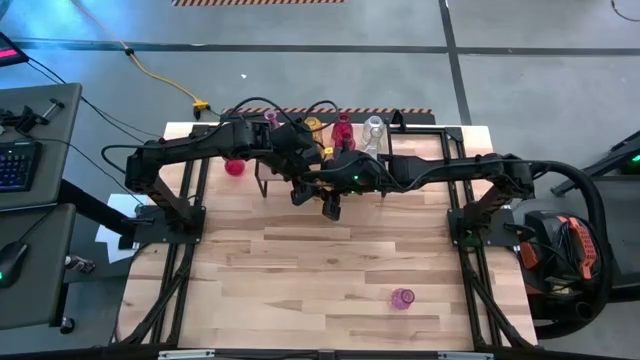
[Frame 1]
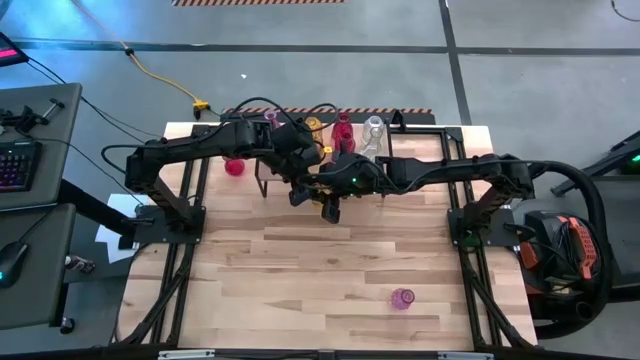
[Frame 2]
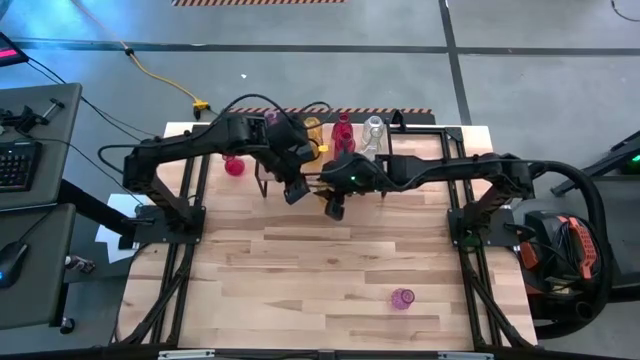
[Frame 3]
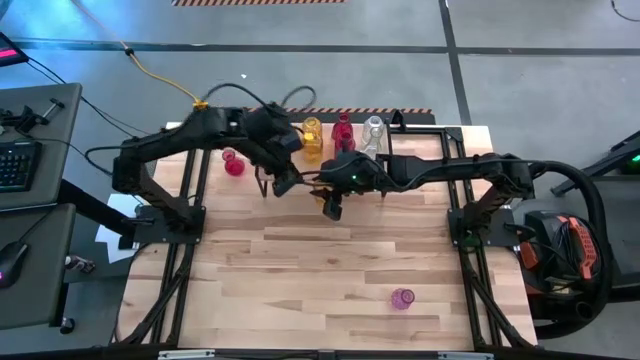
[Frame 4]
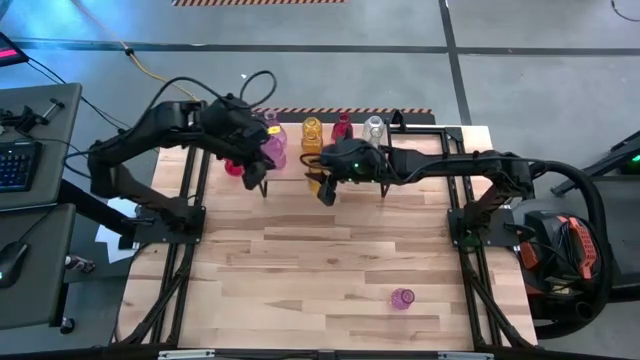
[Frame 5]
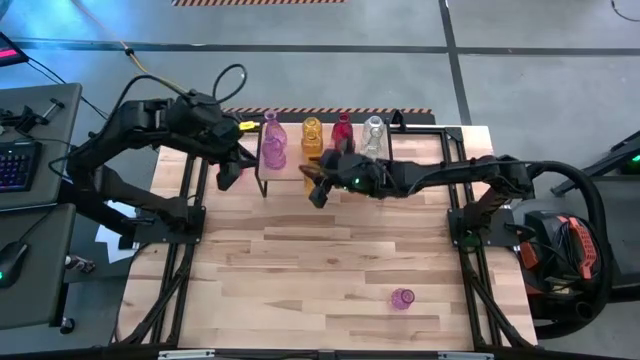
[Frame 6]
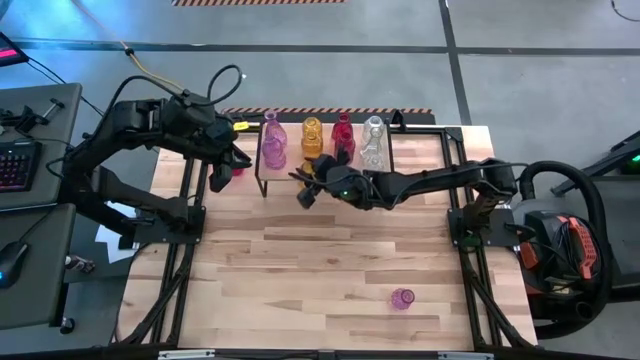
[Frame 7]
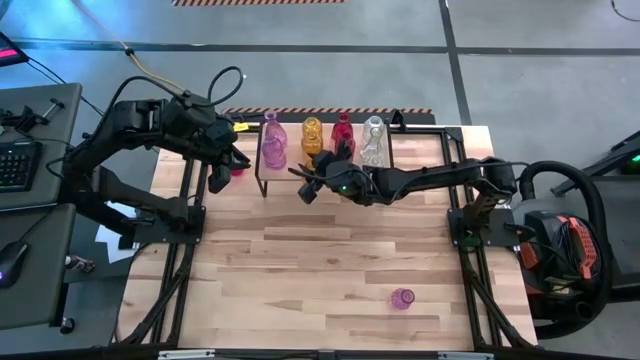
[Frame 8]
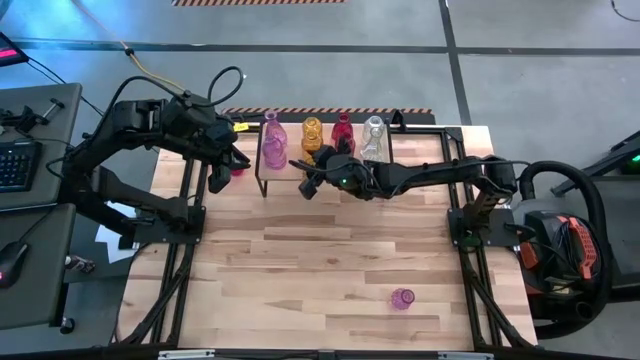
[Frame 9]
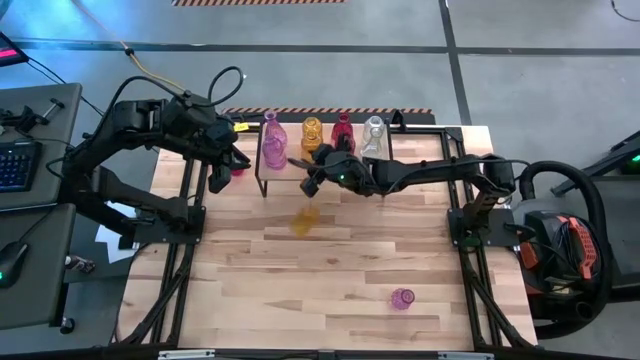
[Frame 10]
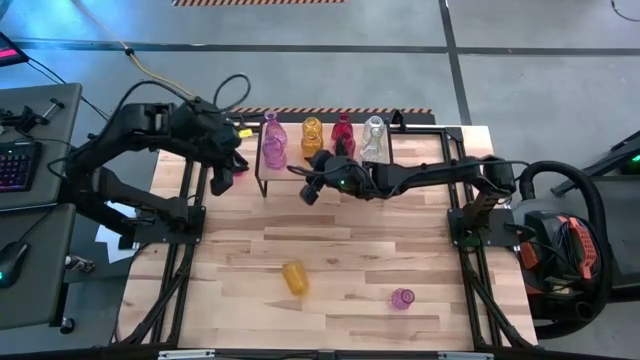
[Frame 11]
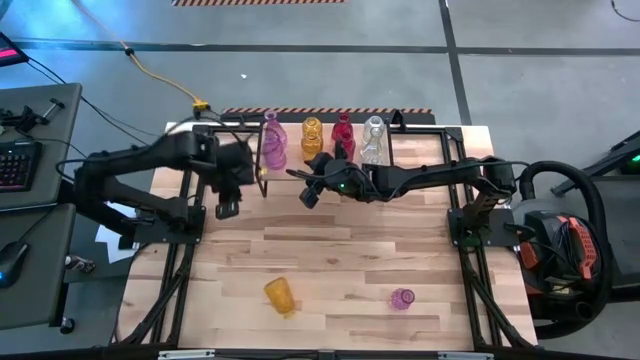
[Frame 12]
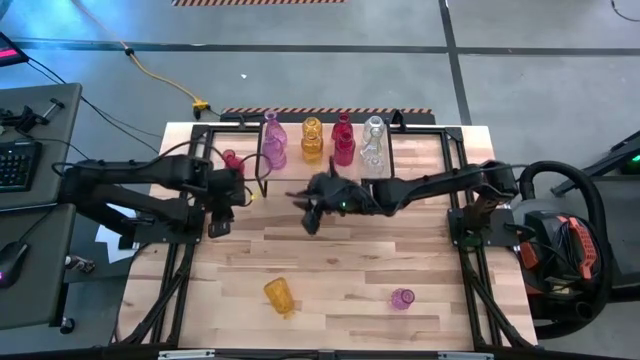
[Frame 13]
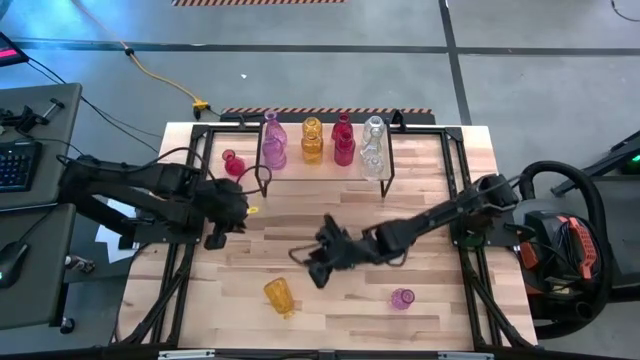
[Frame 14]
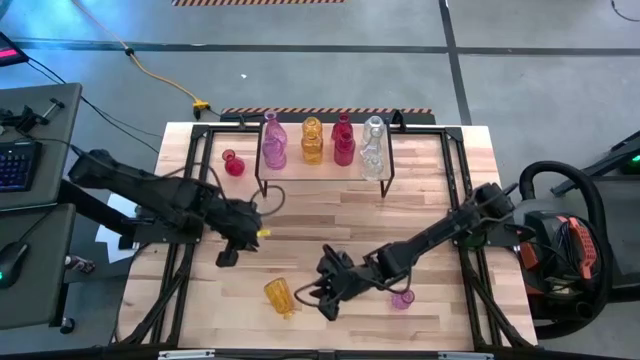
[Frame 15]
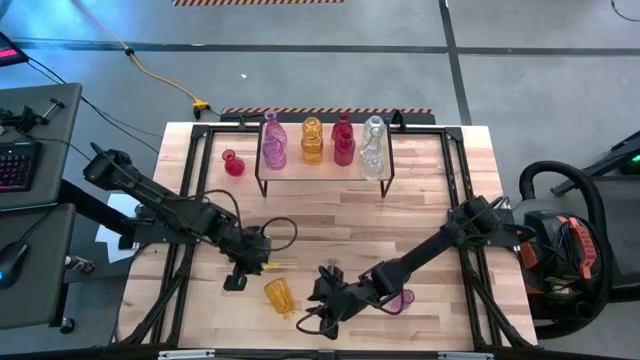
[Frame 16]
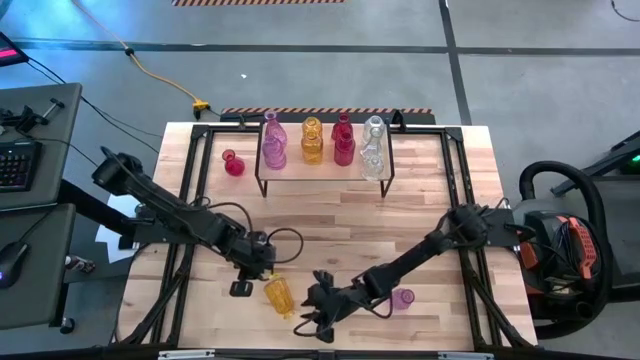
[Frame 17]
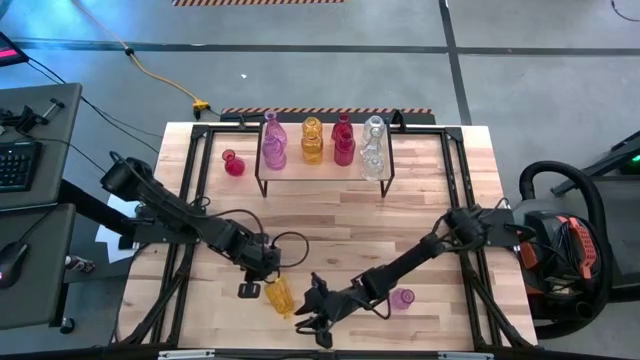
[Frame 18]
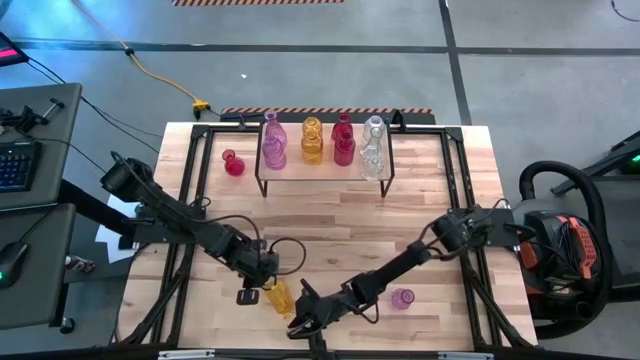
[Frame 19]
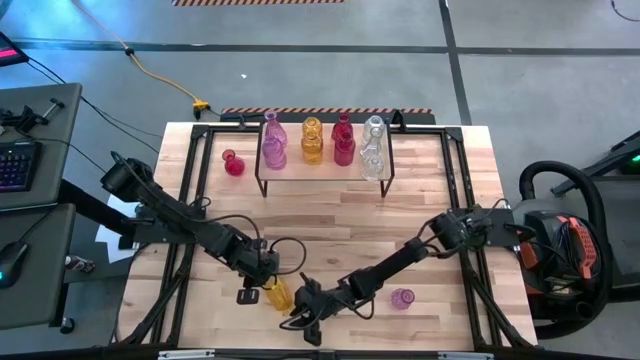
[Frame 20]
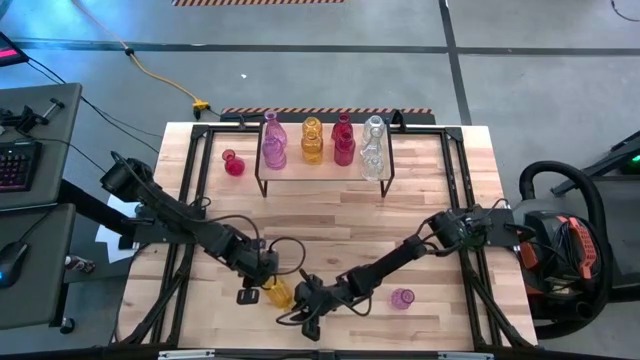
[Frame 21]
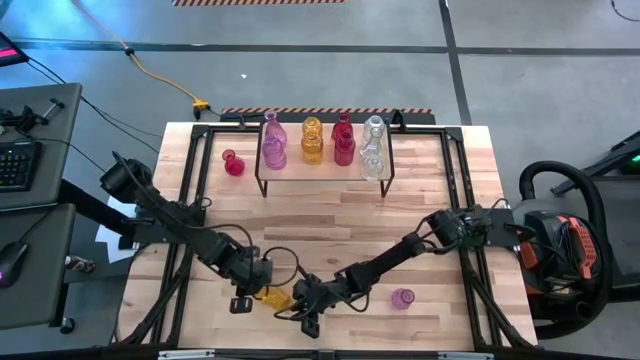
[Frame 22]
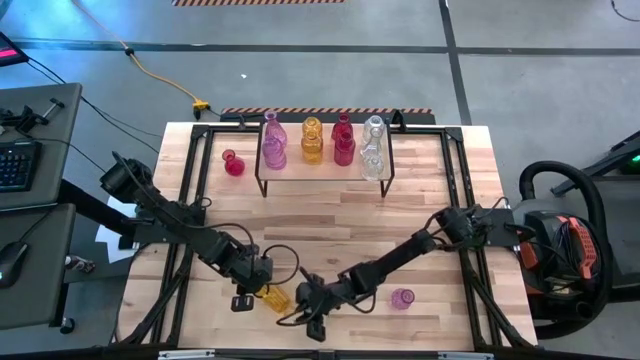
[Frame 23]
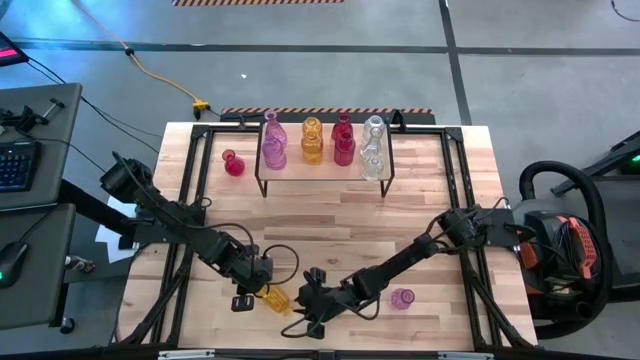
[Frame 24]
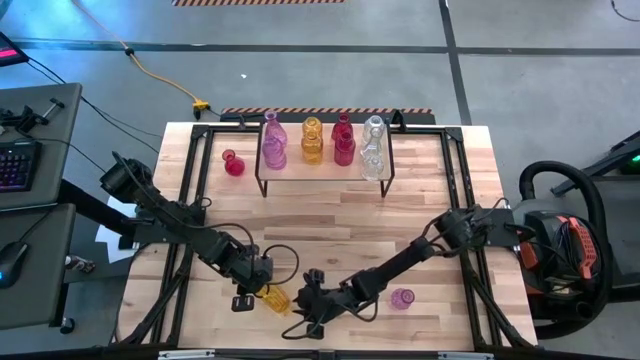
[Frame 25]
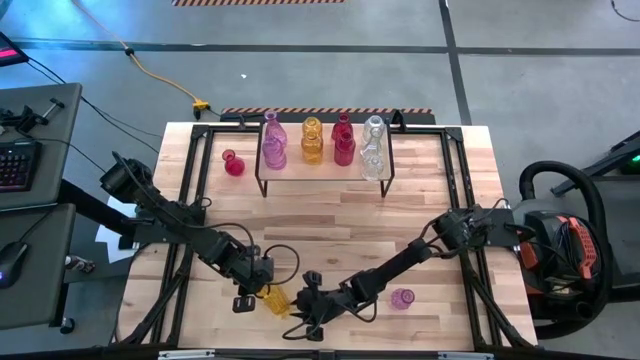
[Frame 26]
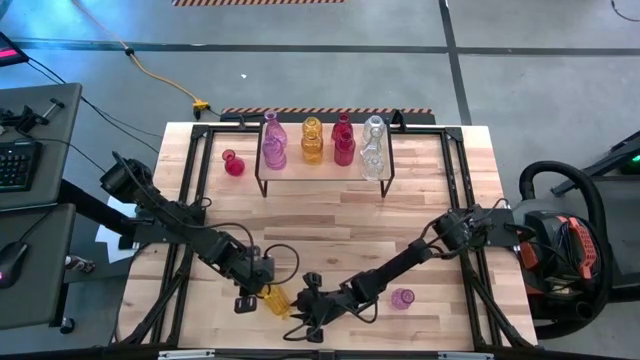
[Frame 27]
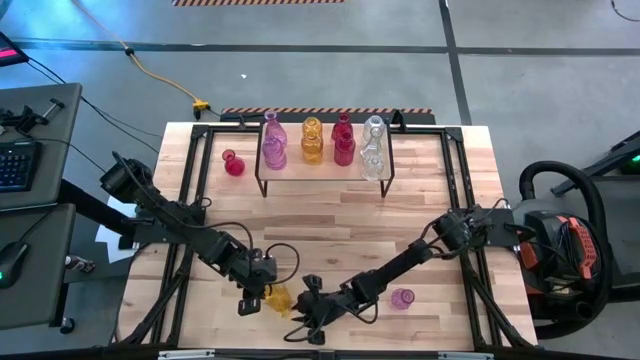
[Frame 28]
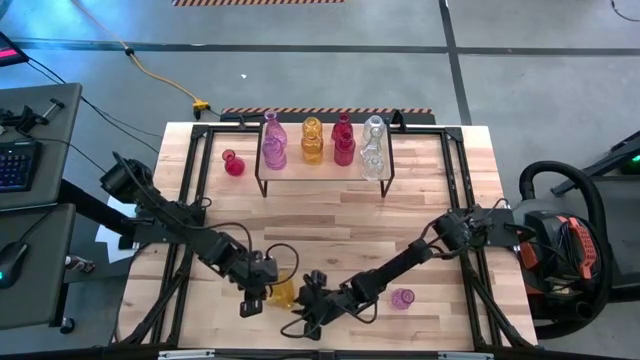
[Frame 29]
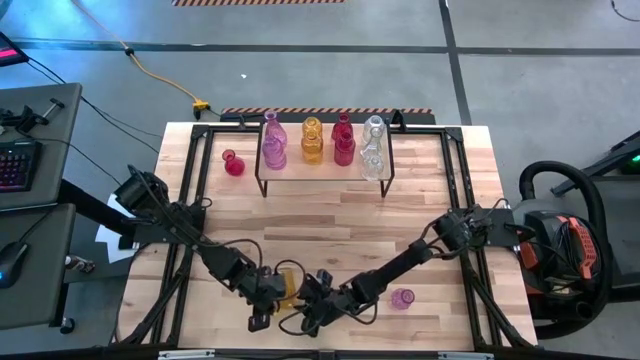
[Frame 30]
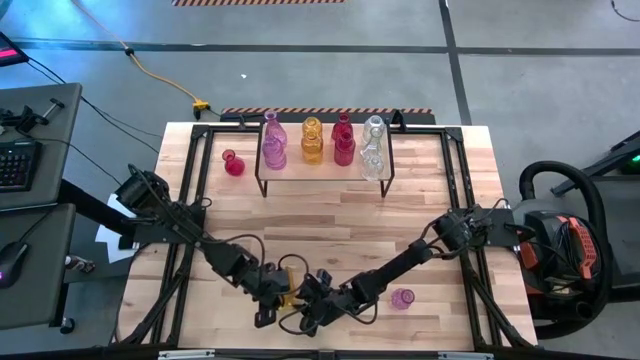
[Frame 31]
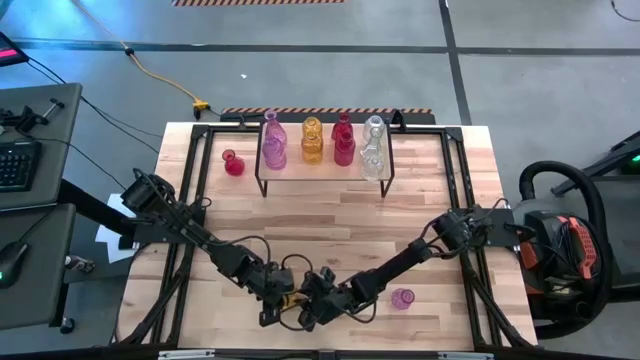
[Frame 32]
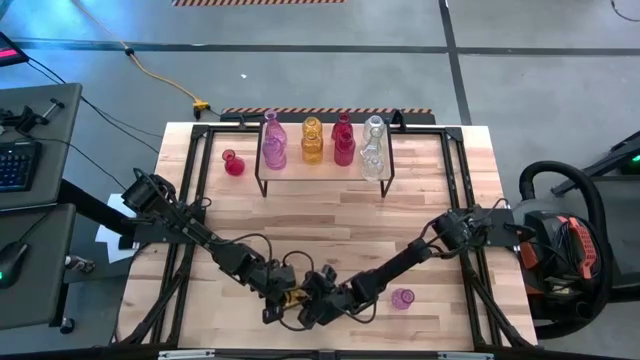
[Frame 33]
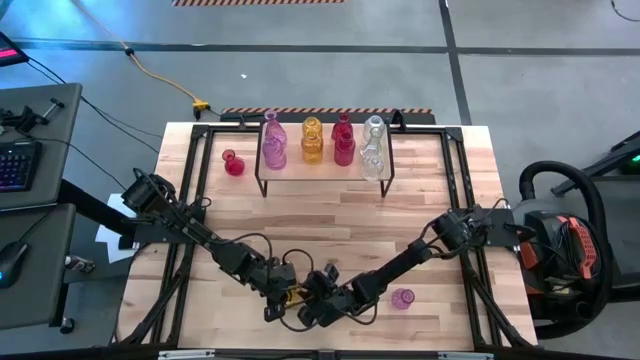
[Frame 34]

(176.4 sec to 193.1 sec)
Task: sort vases onto shelf
Put the yellow vase on the shelf aligned with the other yellow vases

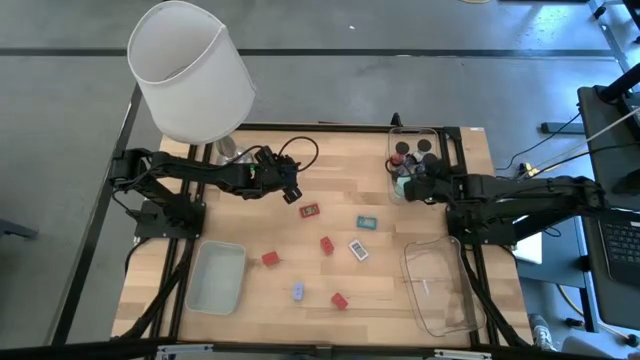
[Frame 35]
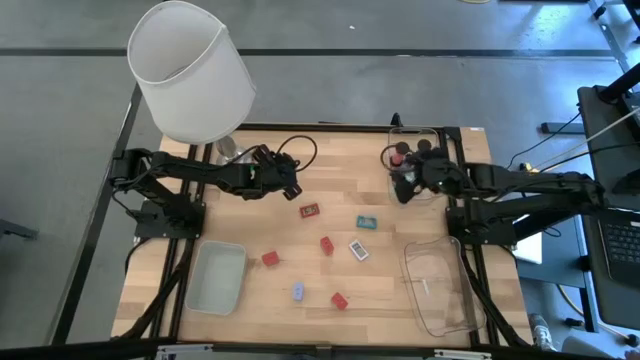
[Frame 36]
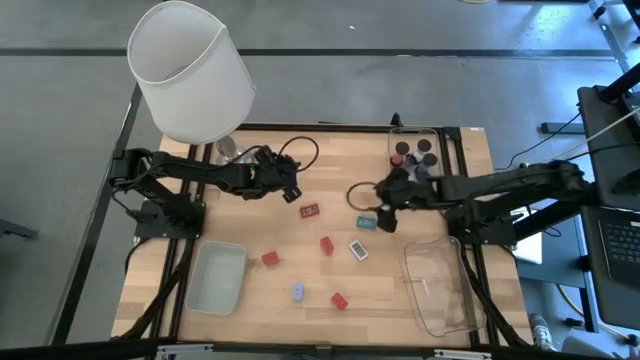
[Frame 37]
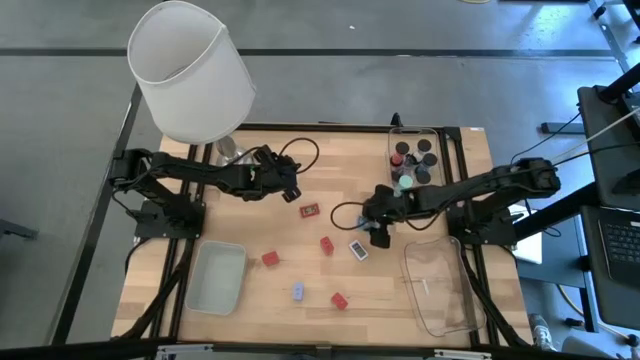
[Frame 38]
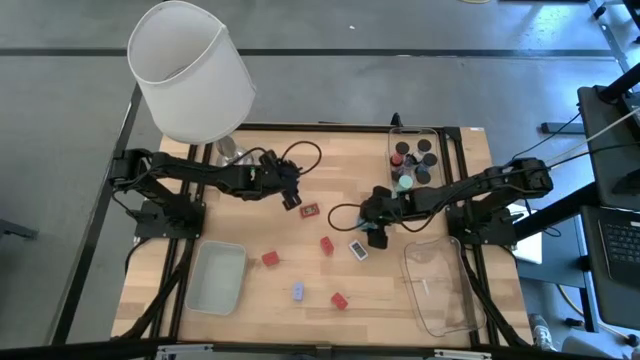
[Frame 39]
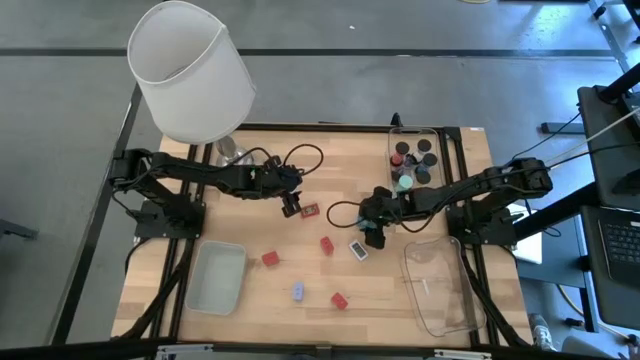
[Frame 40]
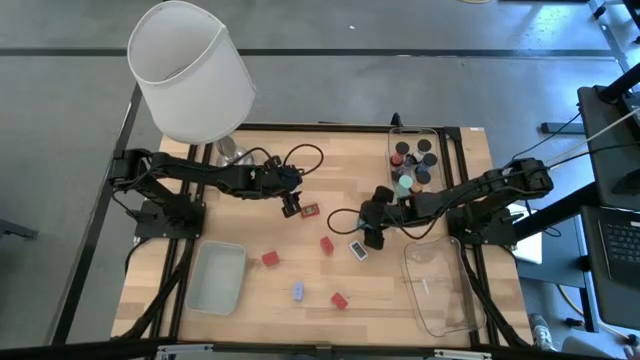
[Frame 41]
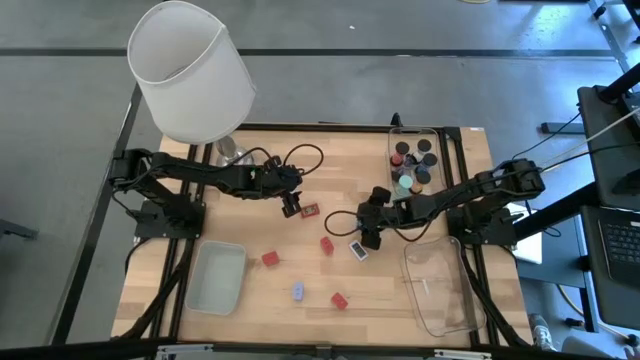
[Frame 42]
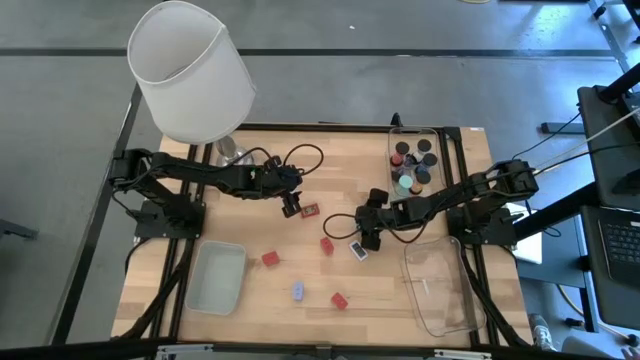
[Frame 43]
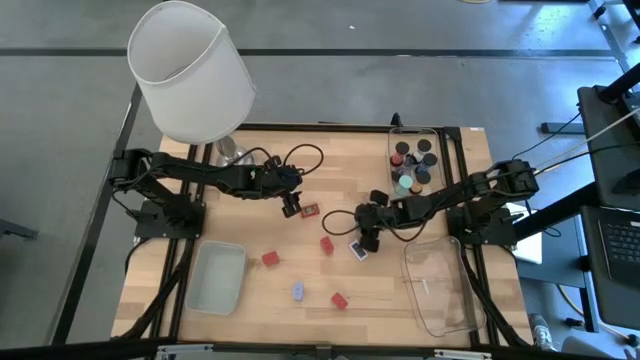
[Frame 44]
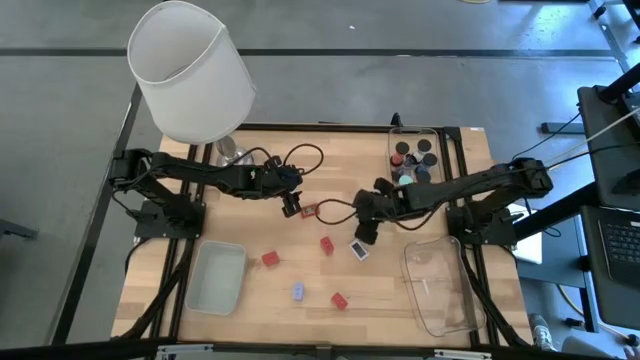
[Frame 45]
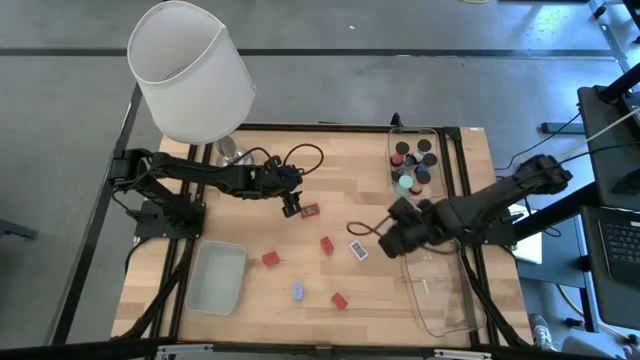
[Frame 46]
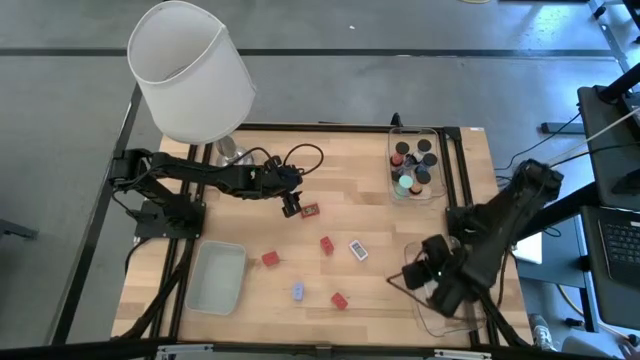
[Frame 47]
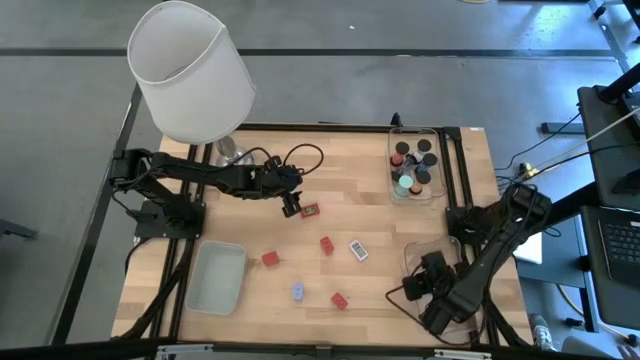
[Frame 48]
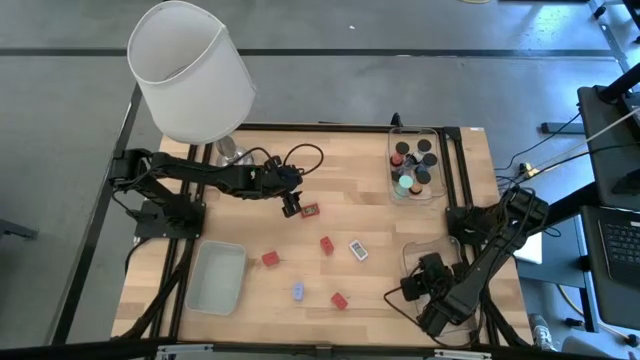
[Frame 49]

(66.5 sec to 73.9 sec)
Task: Pick & Place Office items
Put the blue digital clock into the bottom transparent bin
